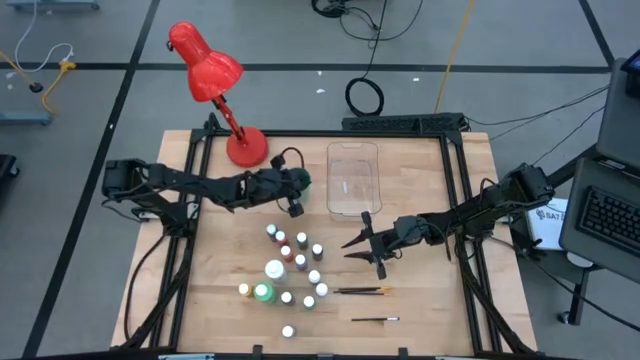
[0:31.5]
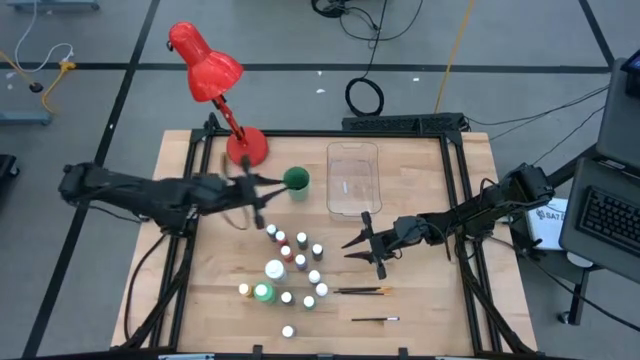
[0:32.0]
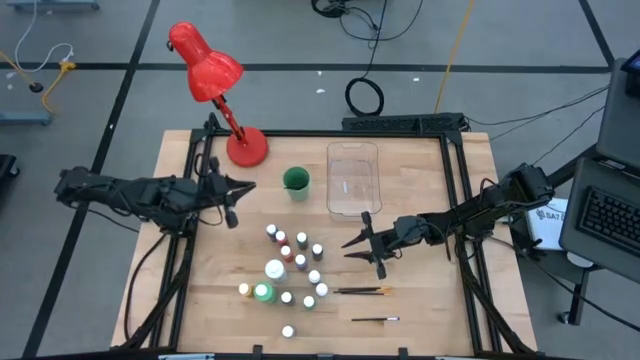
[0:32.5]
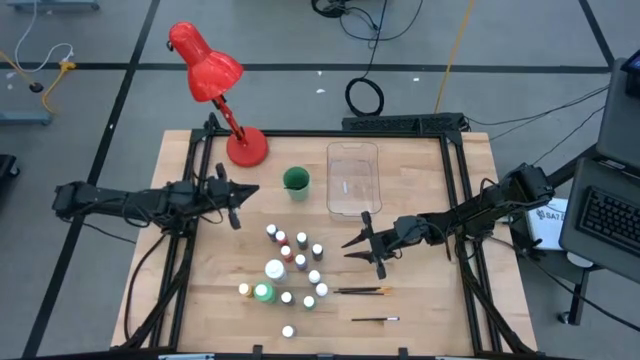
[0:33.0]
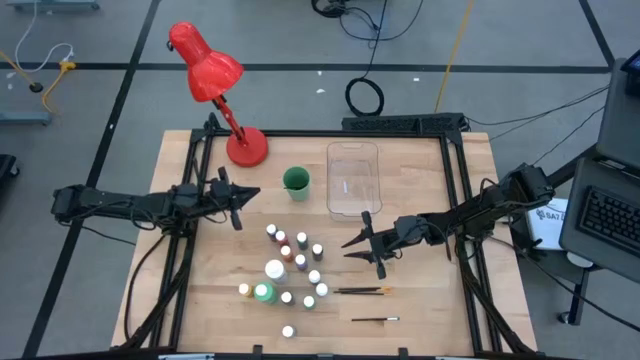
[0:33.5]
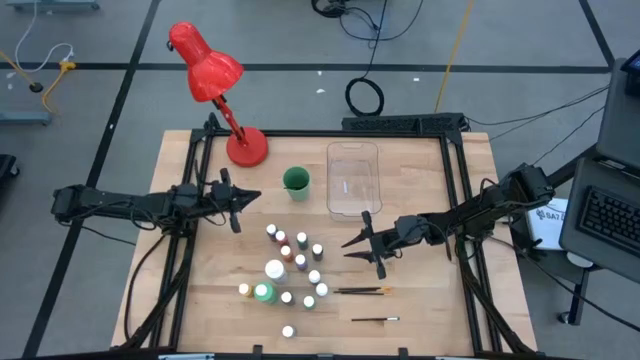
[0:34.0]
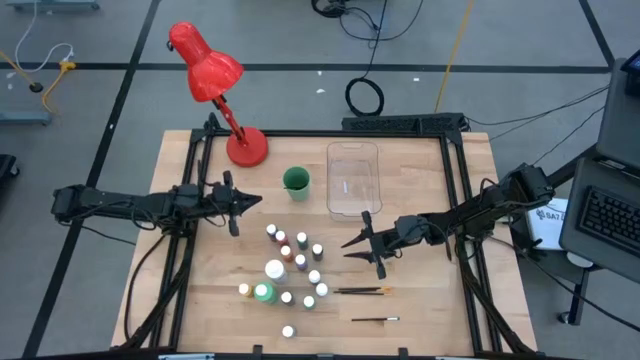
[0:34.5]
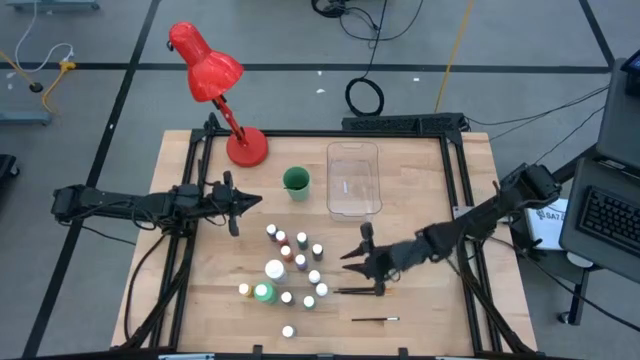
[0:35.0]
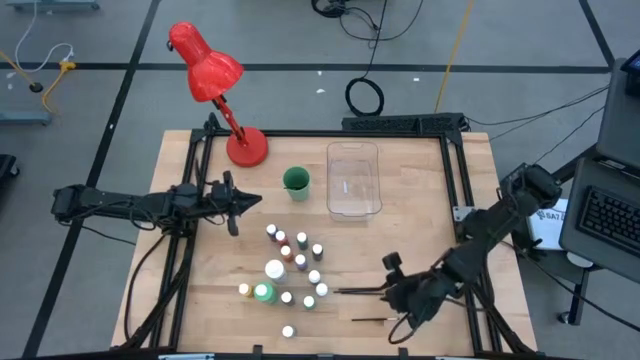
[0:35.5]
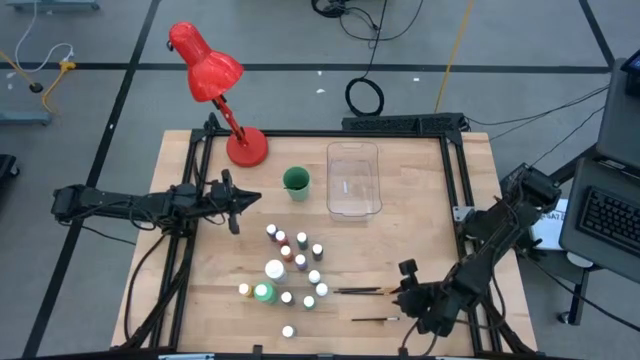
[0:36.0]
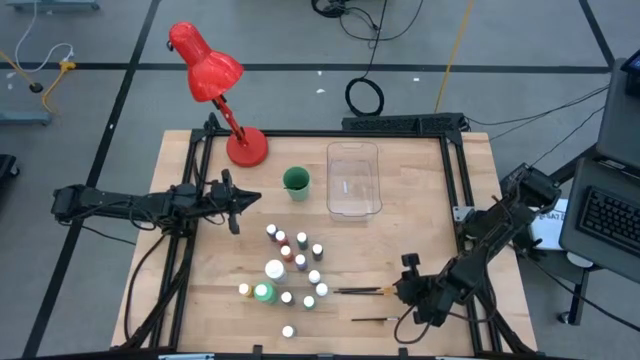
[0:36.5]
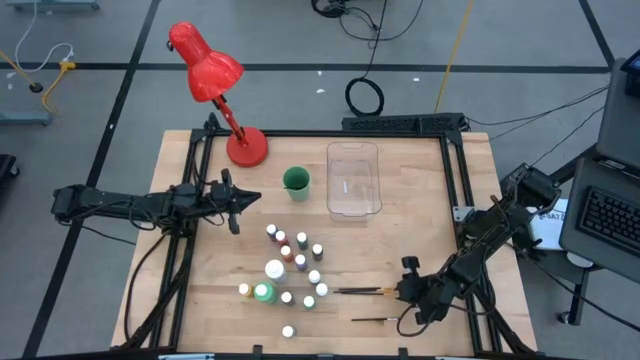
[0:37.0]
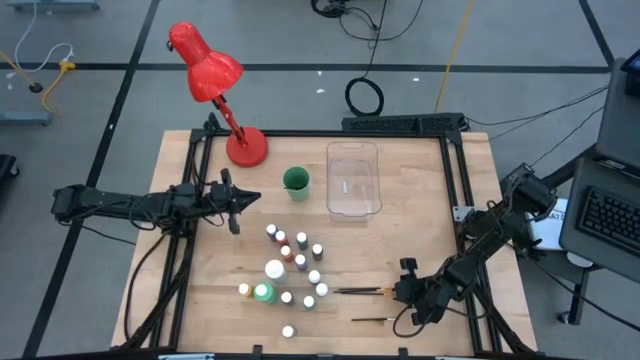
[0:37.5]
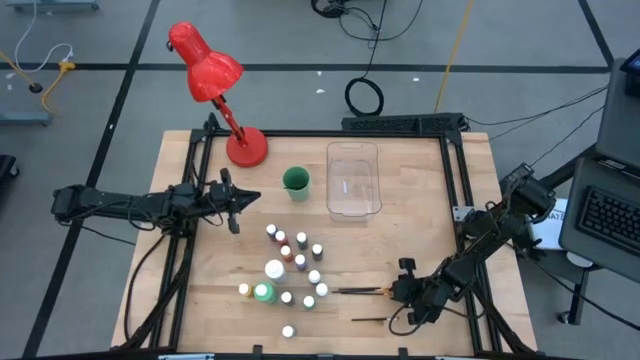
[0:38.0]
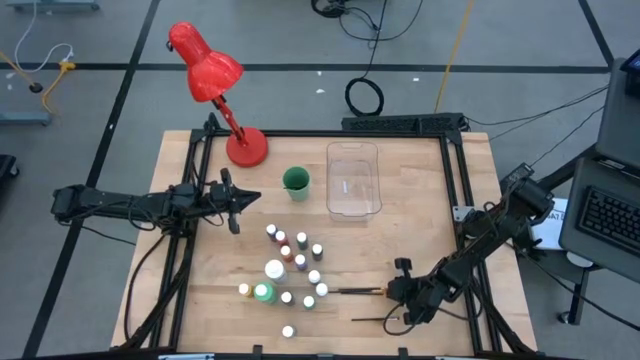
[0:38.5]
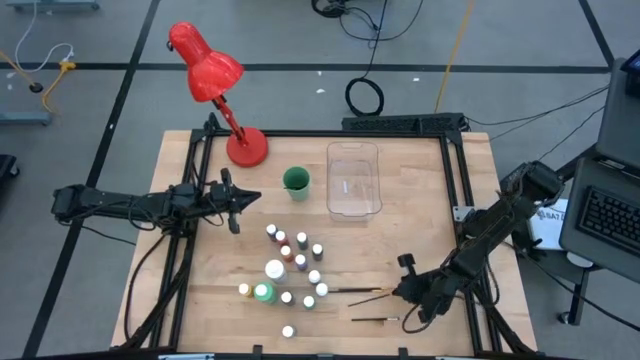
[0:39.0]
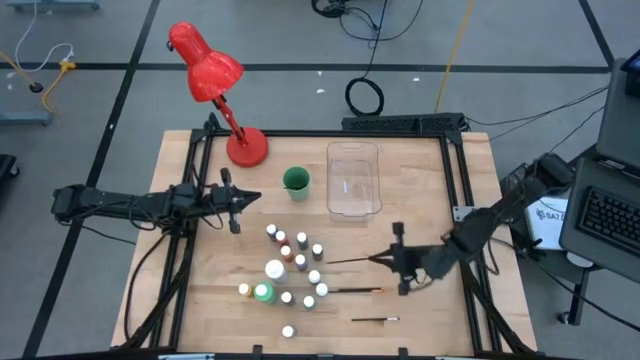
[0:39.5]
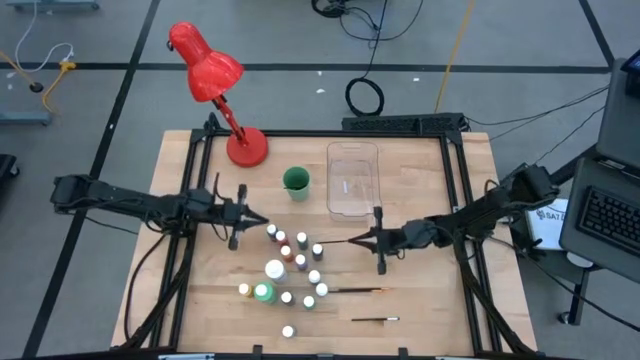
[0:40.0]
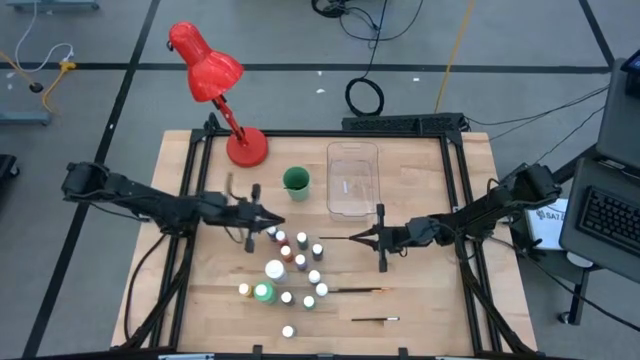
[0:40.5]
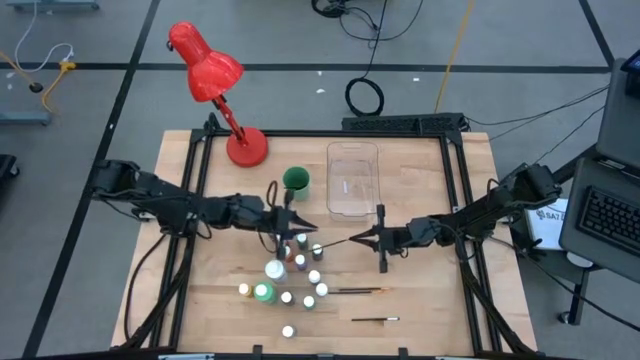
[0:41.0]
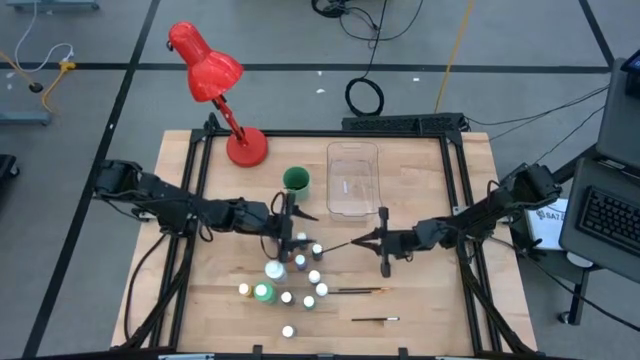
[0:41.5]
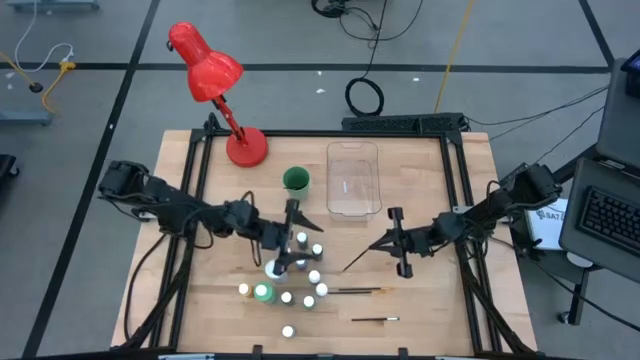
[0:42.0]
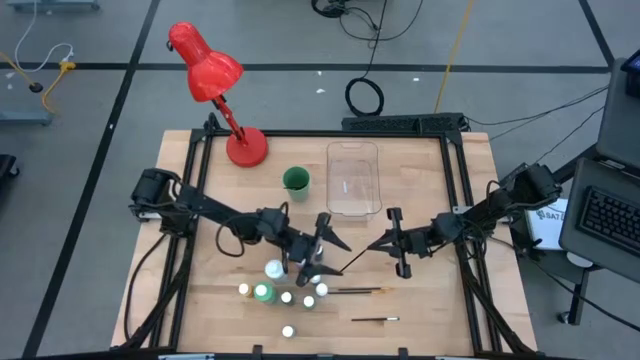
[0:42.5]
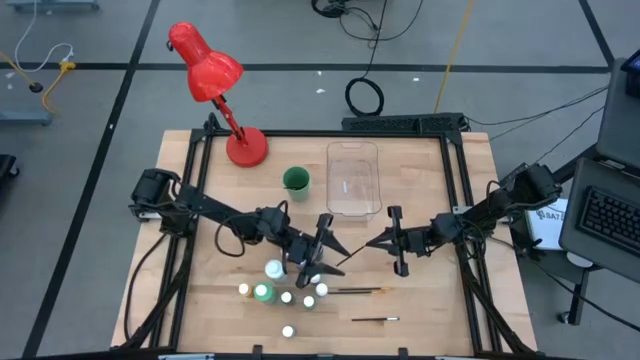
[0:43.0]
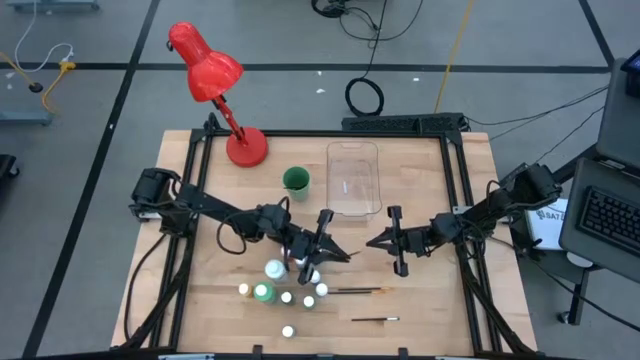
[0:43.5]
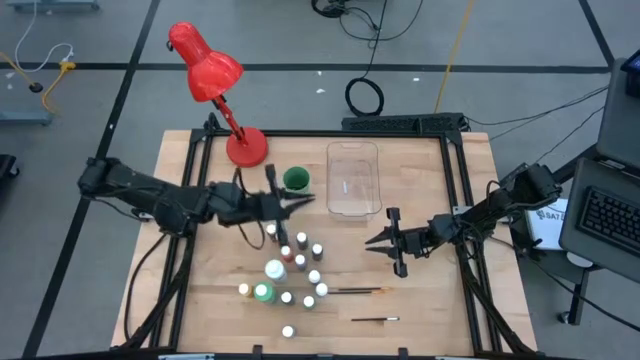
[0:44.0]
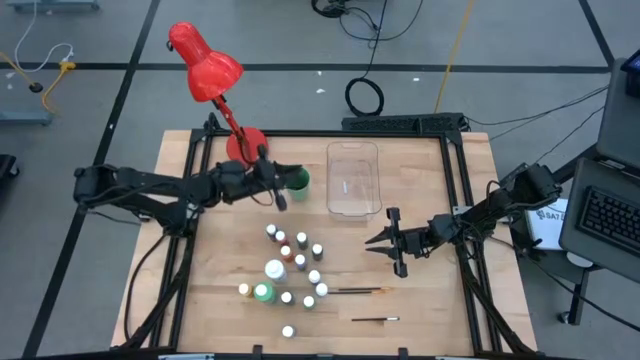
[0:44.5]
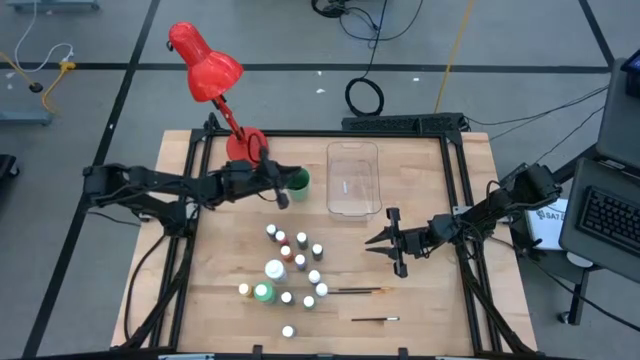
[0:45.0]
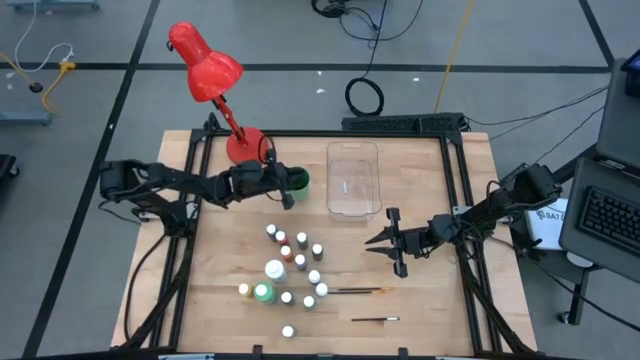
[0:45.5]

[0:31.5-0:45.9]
Task: Pick & Place Paint Supplies
Put the orange paint brush into the green cup

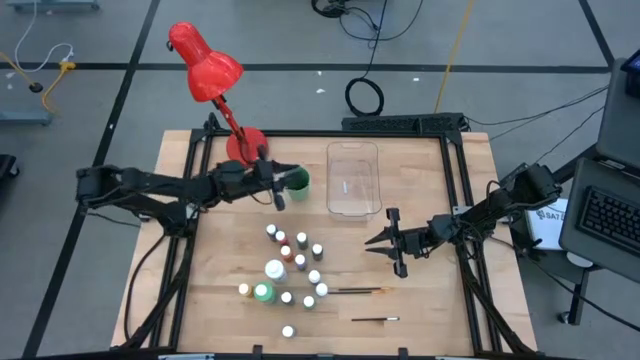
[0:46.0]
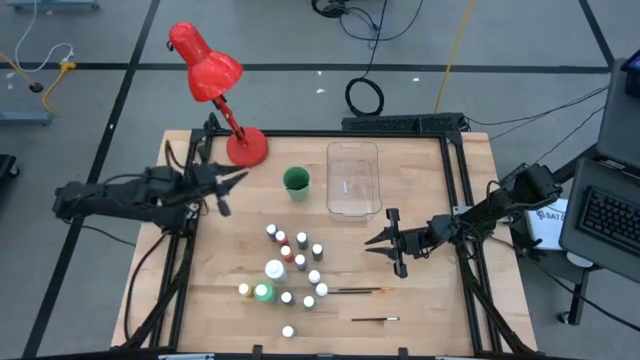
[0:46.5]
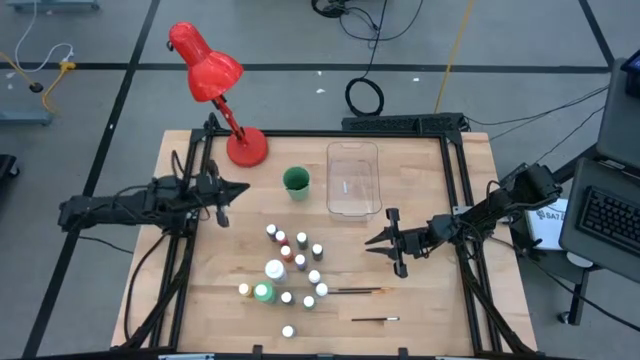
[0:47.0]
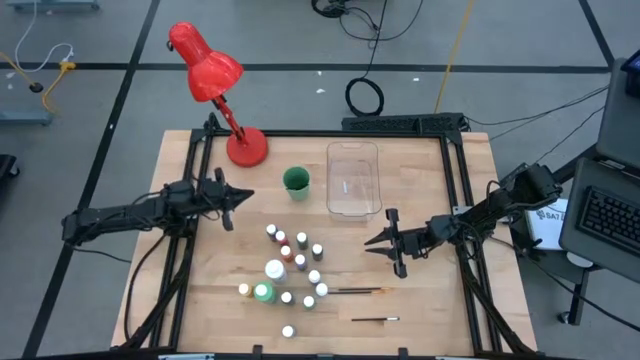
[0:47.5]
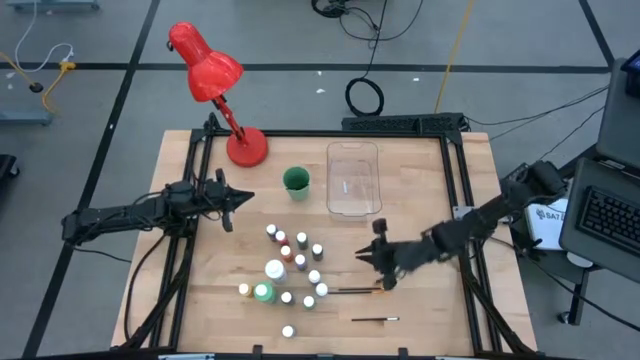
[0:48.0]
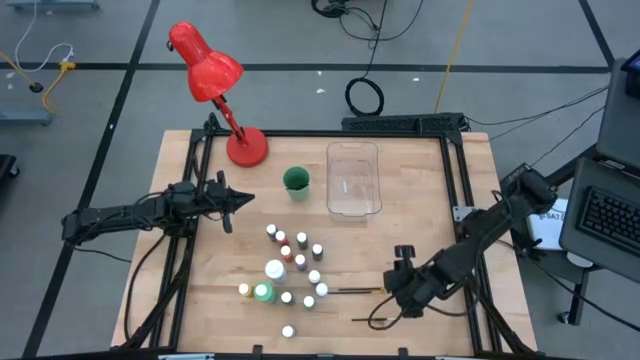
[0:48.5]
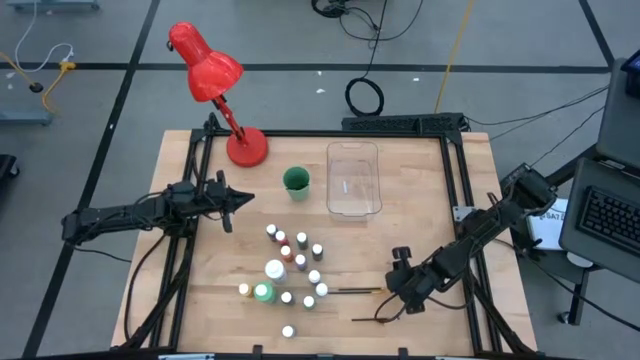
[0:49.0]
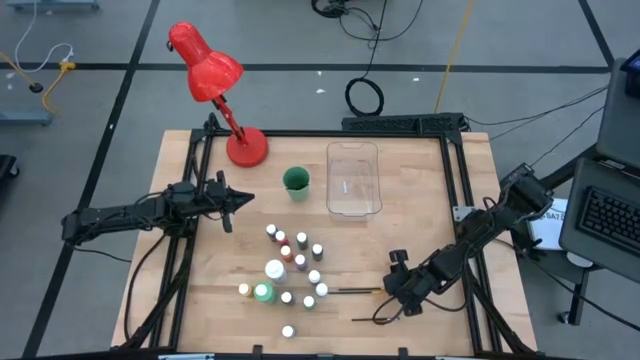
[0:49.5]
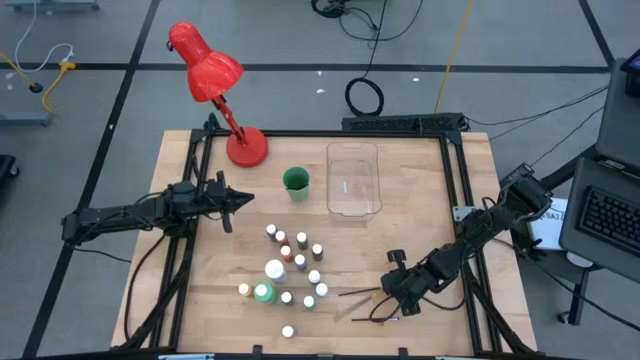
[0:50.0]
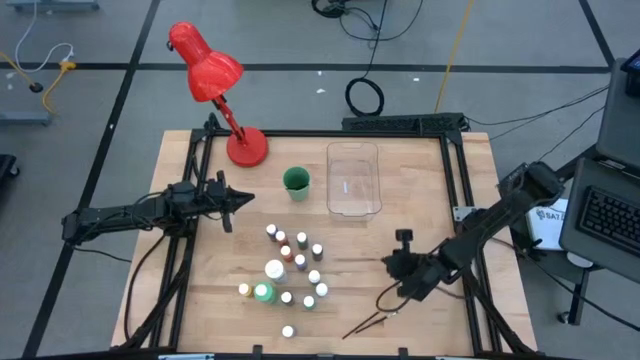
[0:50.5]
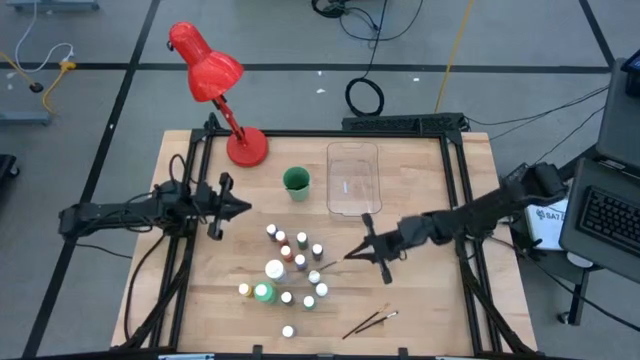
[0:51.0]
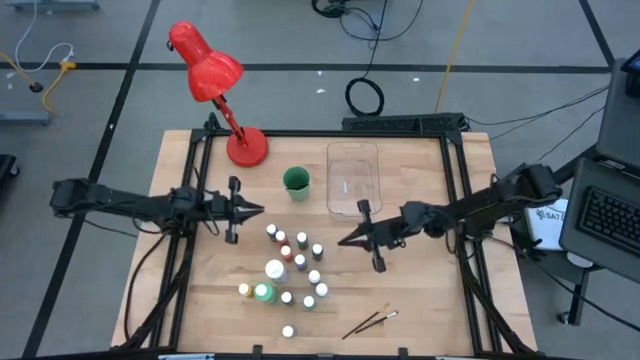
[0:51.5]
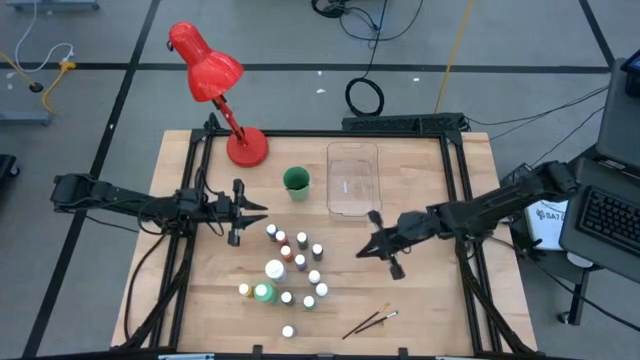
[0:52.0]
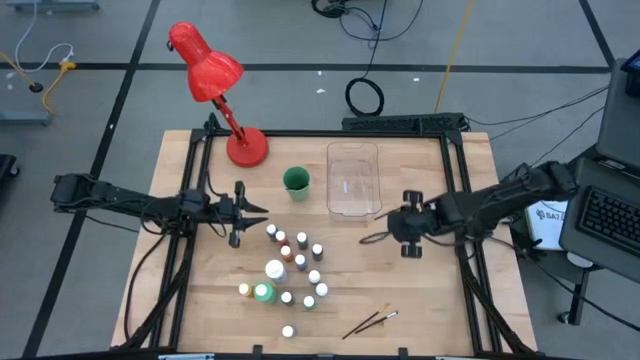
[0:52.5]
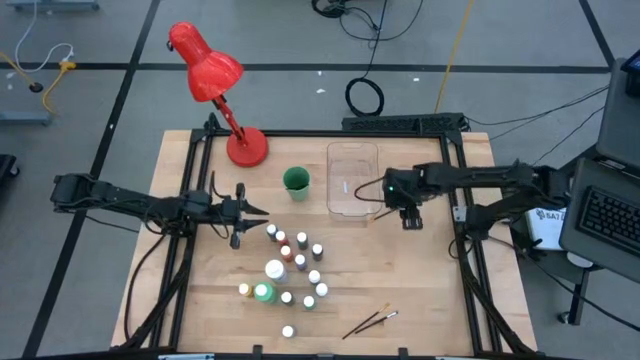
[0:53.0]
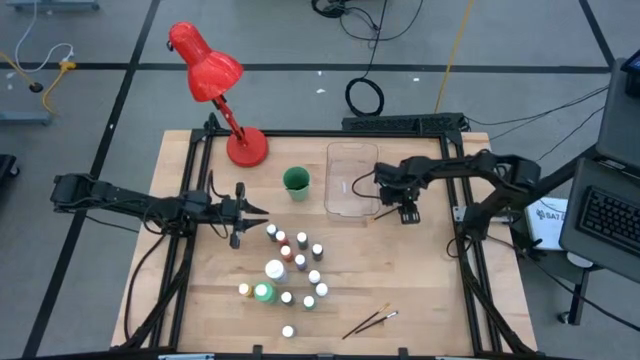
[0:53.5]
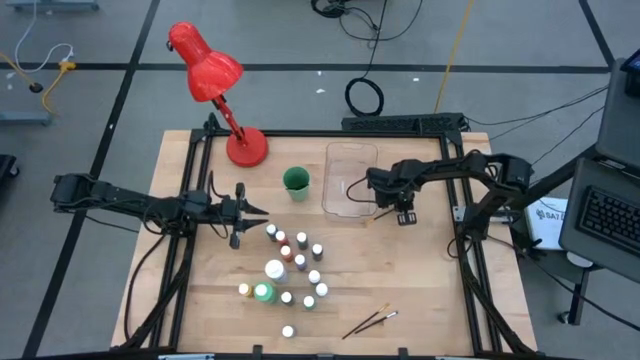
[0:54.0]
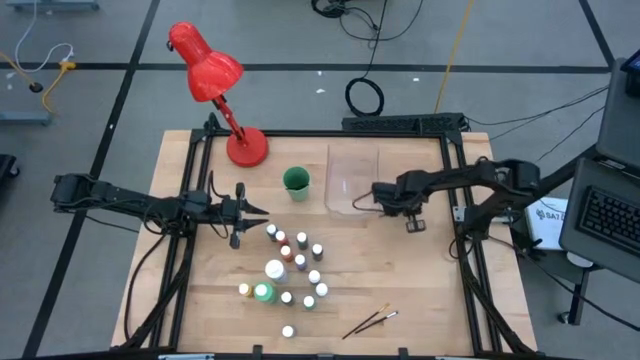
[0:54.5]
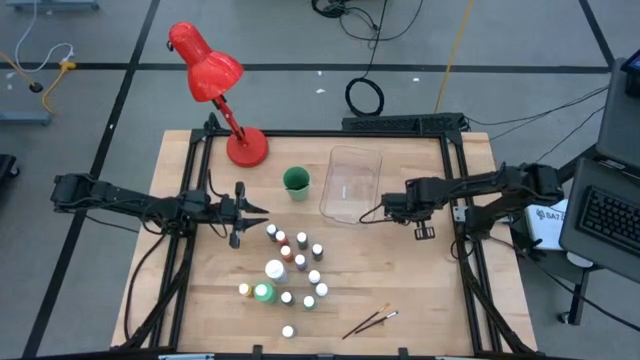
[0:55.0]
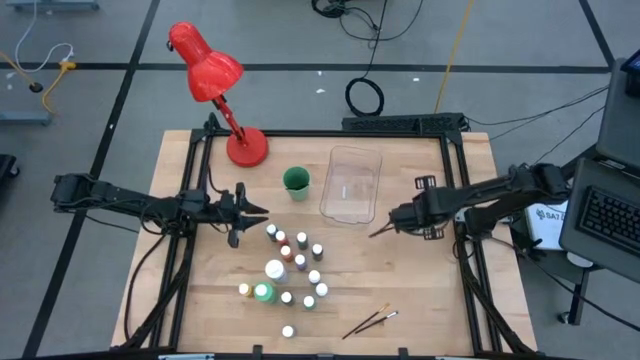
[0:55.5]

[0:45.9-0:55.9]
Put the orange paint brush into the green cup
